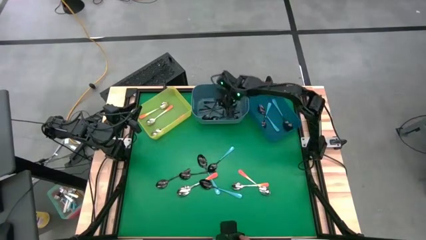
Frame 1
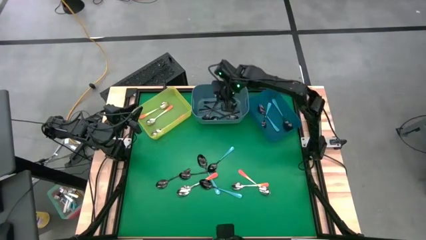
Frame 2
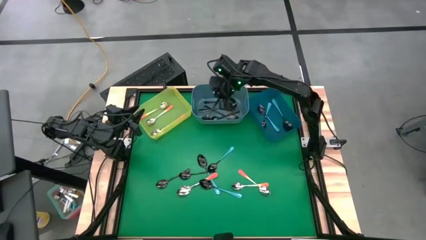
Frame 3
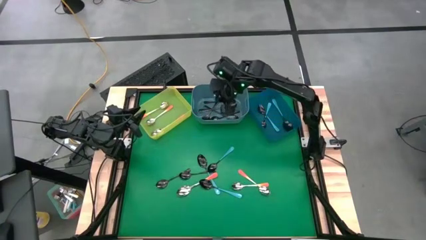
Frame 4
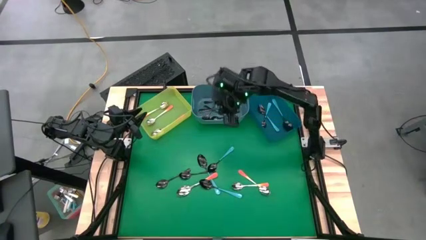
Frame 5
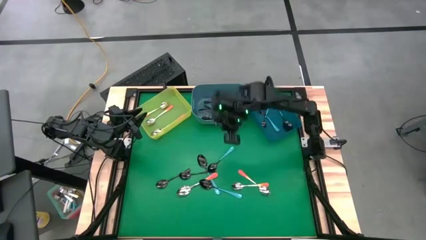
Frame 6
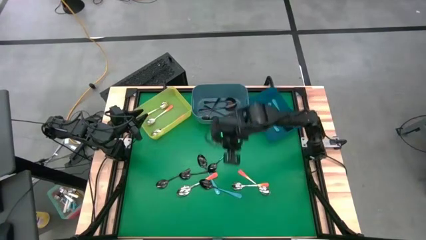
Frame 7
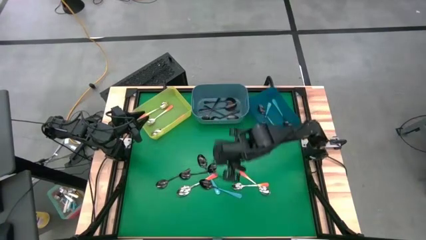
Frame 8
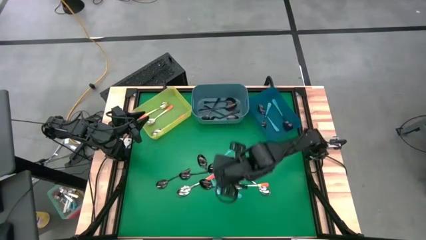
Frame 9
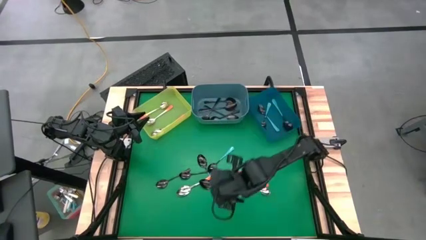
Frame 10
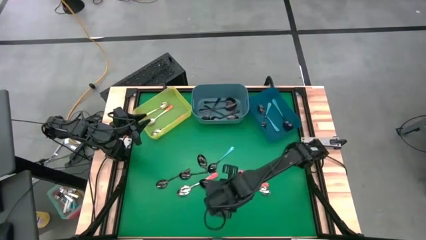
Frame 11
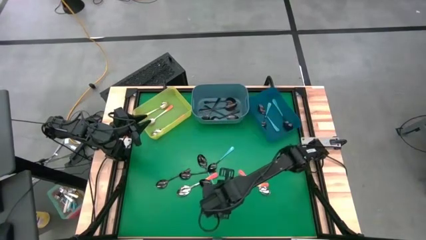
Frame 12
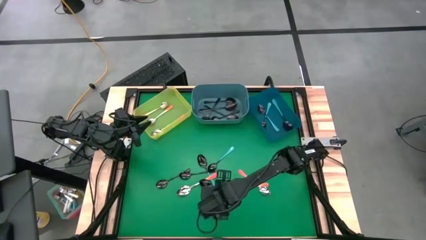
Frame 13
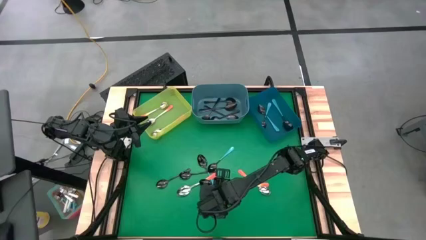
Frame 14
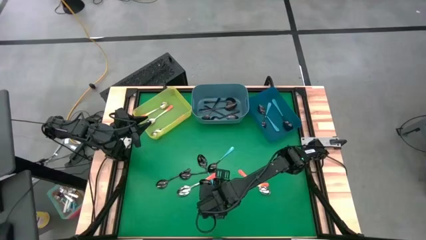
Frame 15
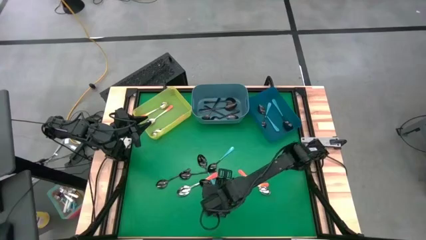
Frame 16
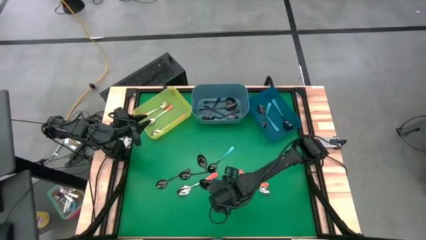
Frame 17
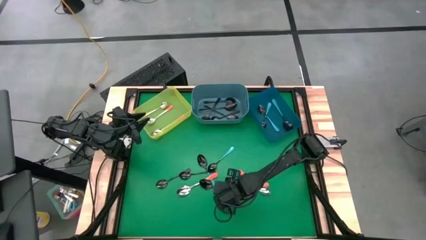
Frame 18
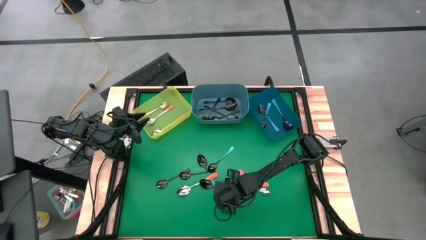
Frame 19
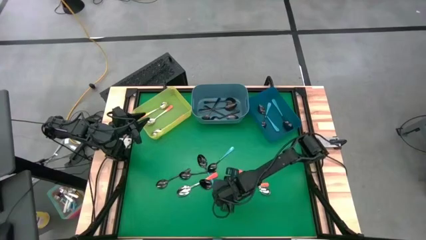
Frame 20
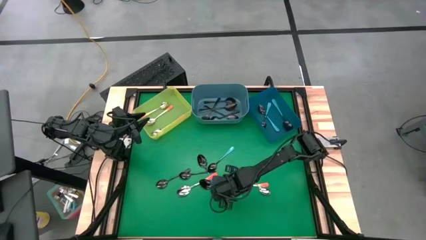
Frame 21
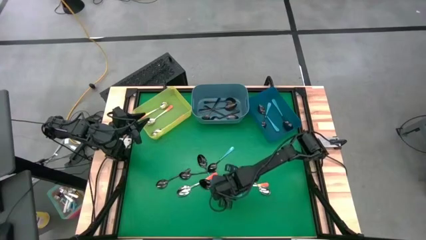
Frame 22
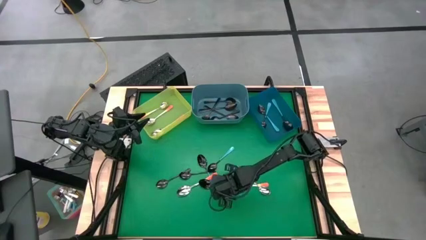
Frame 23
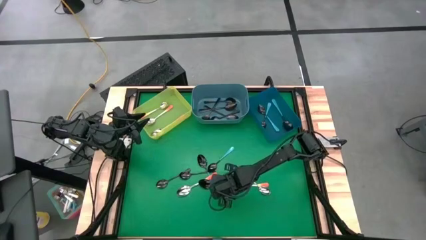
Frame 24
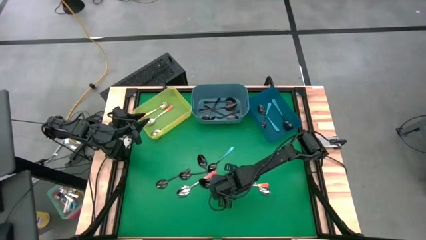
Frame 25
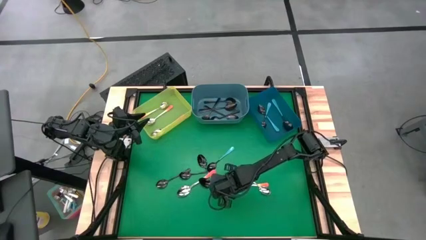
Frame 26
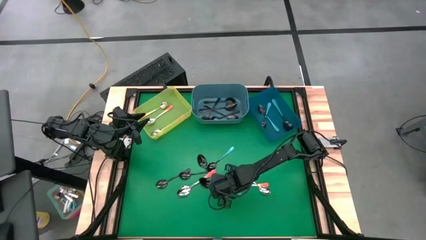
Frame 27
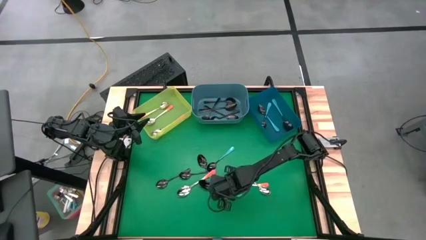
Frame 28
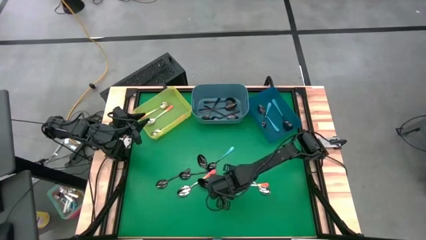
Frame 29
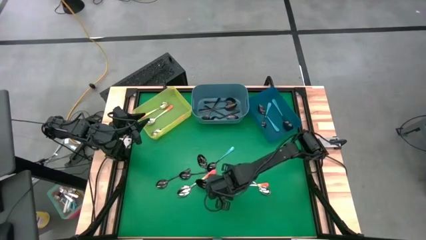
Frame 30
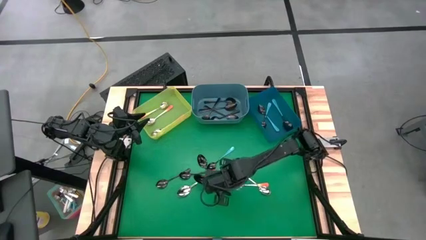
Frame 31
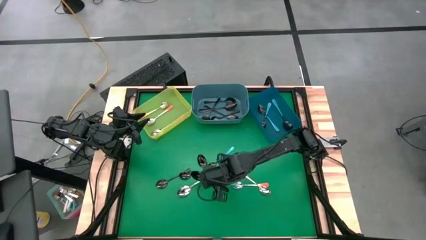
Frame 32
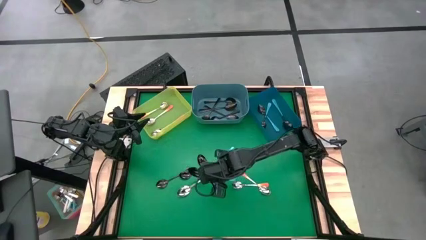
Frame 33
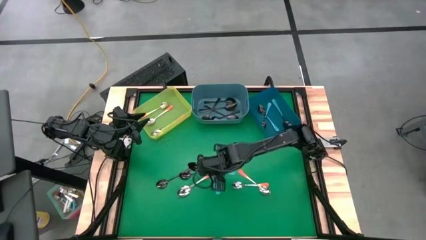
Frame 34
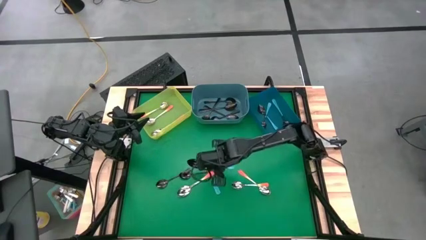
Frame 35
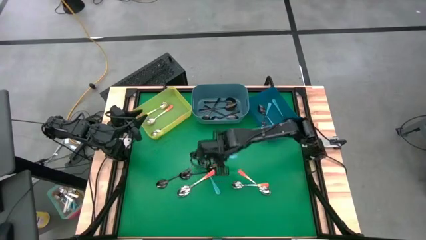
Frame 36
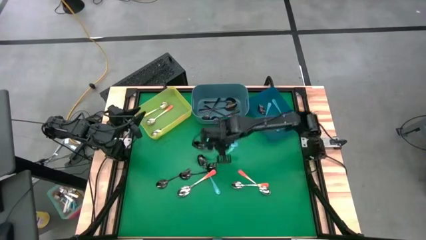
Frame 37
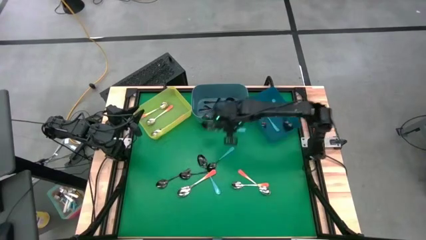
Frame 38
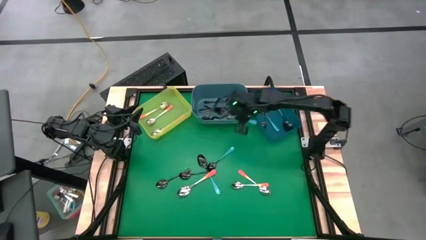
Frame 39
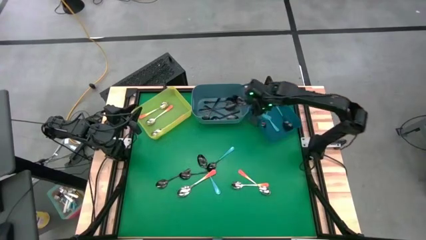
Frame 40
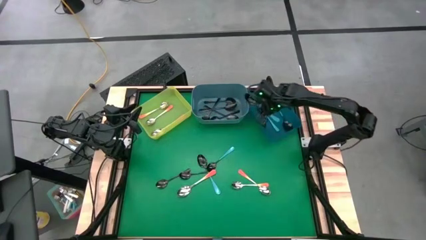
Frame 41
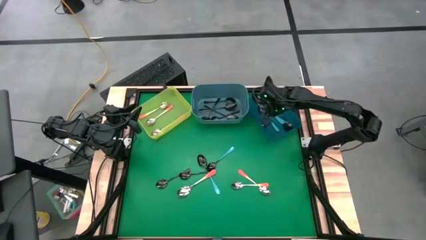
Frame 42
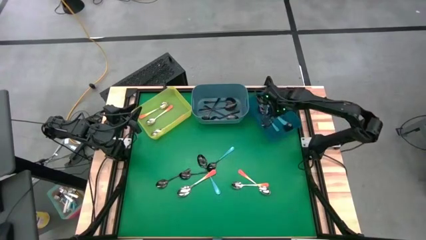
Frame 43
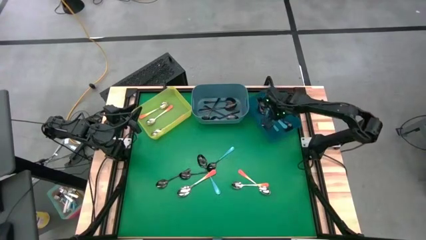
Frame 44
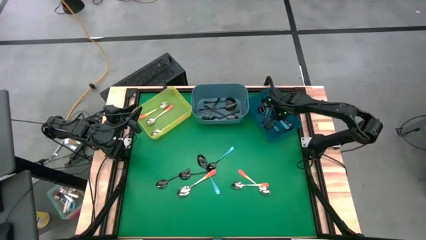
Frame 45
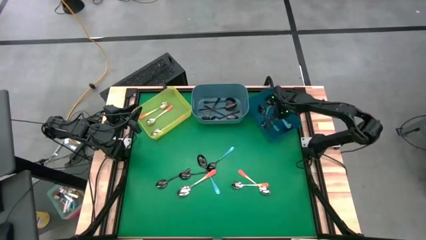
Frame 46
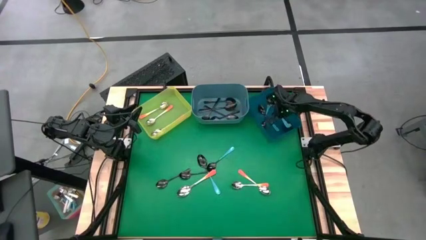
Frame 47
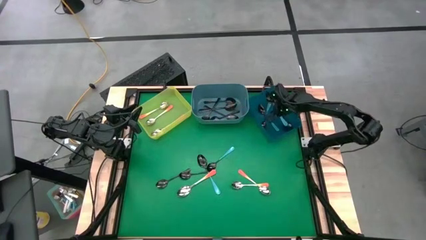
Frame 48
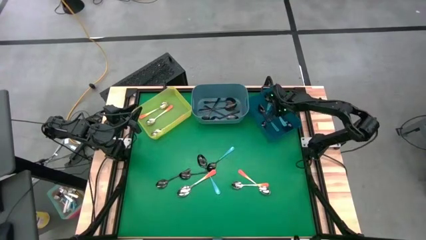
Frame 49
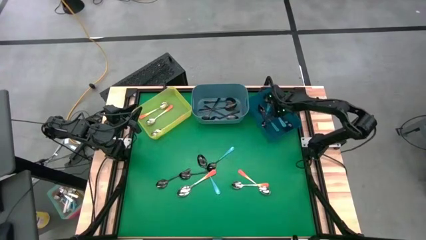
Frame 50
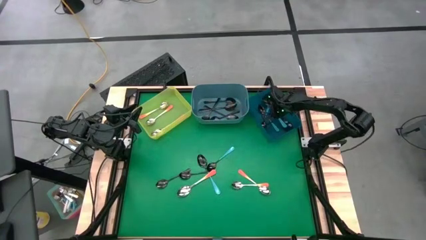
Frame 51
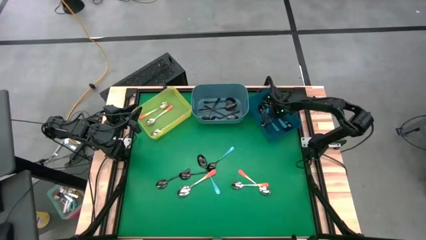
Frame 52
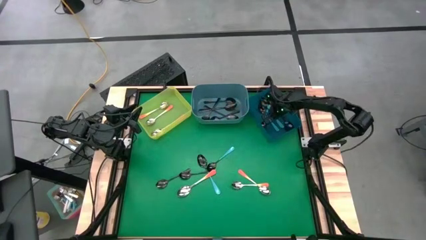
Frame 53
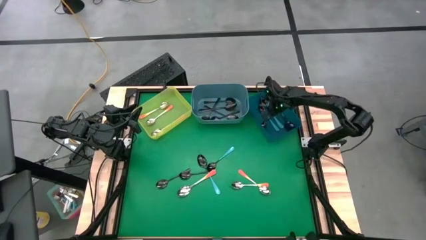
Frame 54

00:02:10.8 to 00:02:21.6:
Task: Sort silverware by color (type)
Put the blue spoon into the blue bin

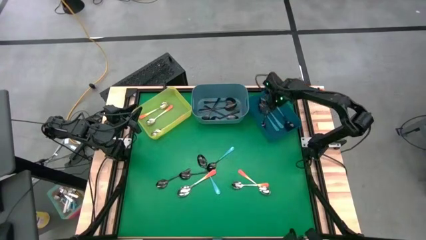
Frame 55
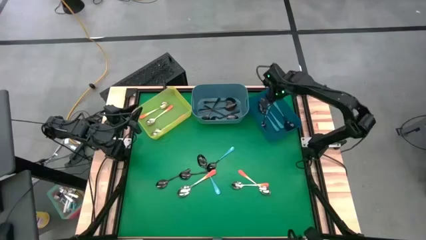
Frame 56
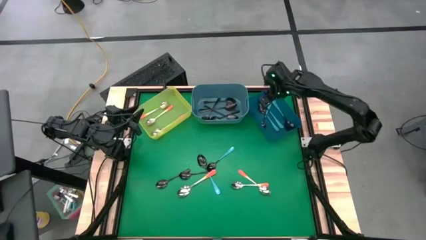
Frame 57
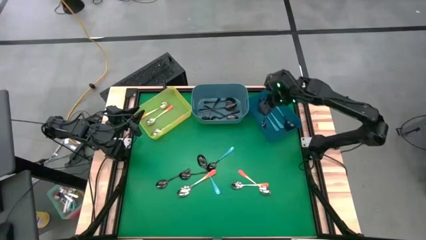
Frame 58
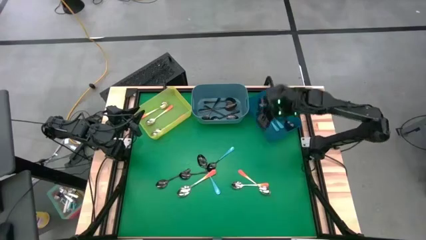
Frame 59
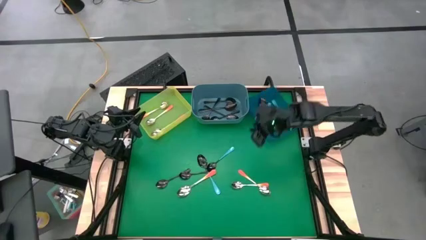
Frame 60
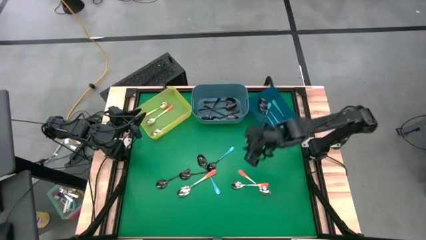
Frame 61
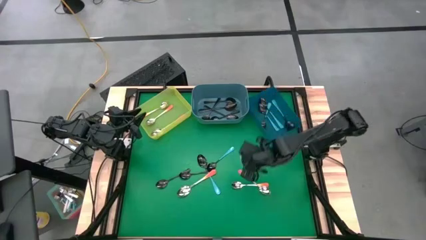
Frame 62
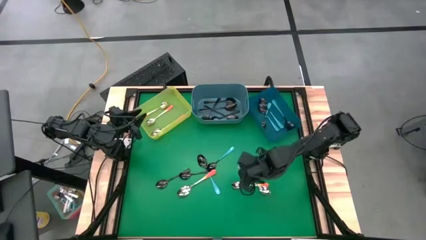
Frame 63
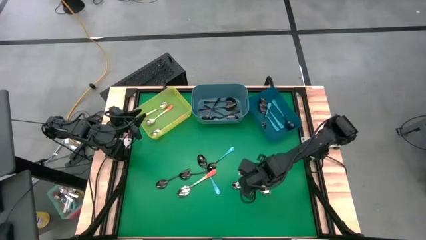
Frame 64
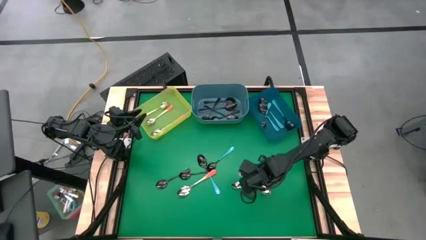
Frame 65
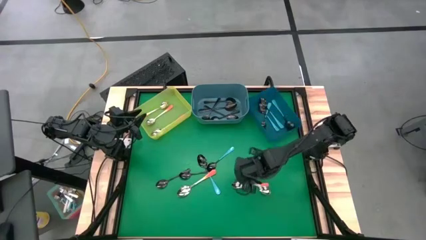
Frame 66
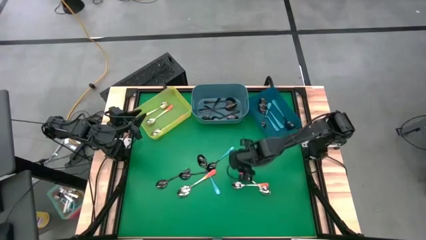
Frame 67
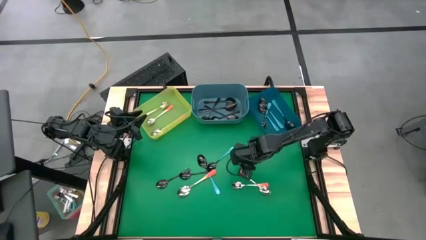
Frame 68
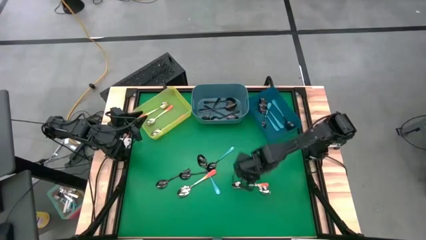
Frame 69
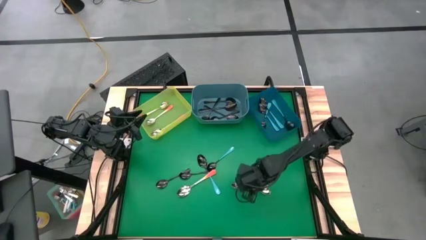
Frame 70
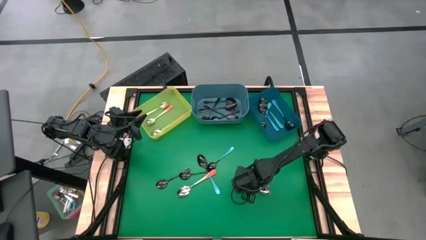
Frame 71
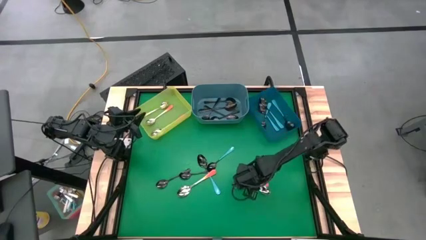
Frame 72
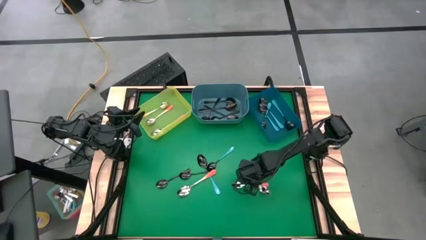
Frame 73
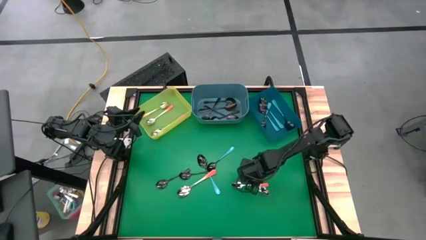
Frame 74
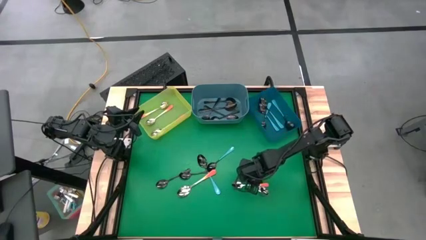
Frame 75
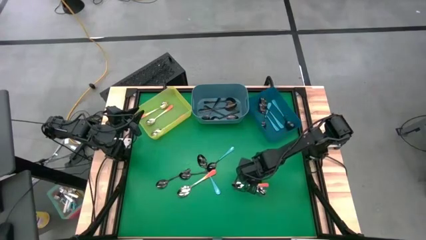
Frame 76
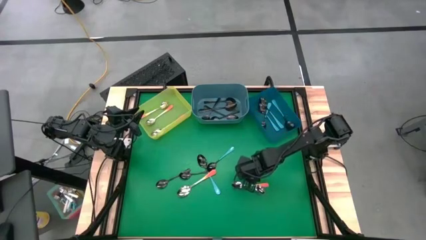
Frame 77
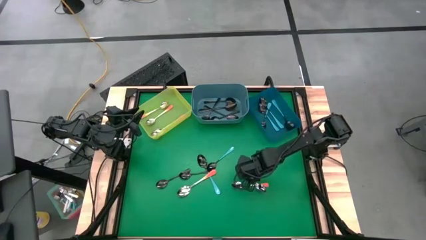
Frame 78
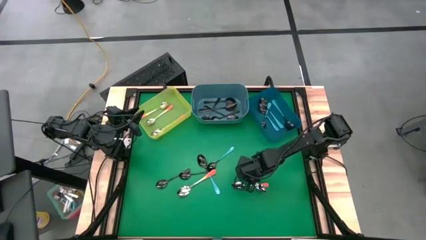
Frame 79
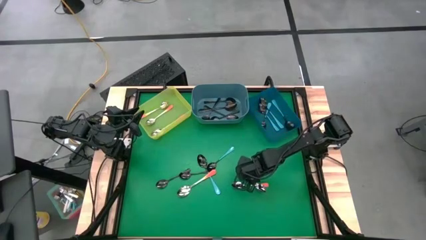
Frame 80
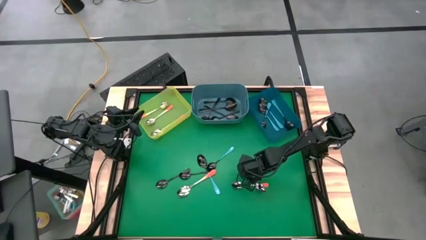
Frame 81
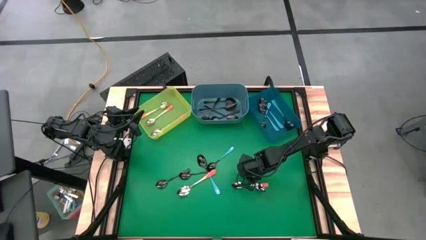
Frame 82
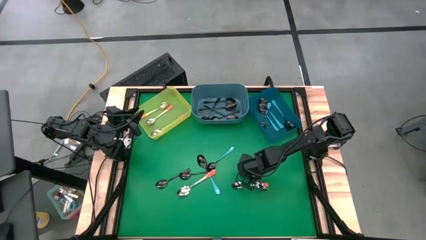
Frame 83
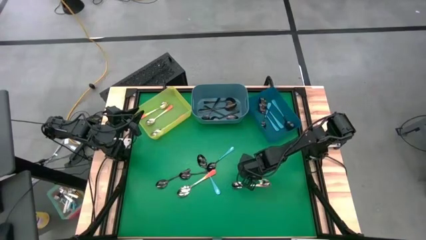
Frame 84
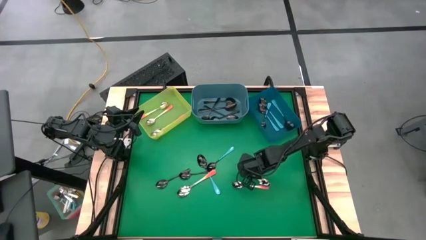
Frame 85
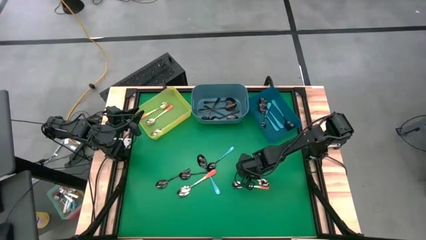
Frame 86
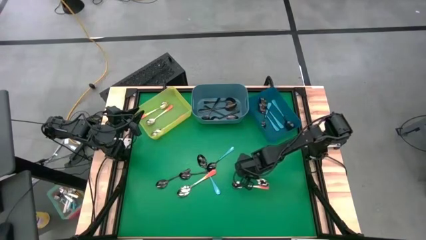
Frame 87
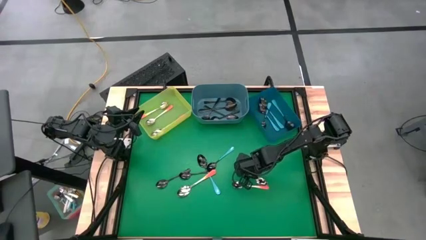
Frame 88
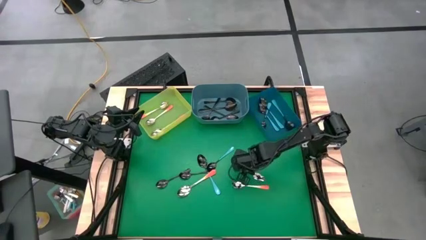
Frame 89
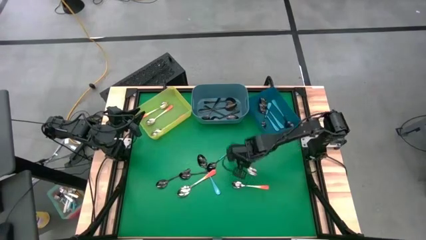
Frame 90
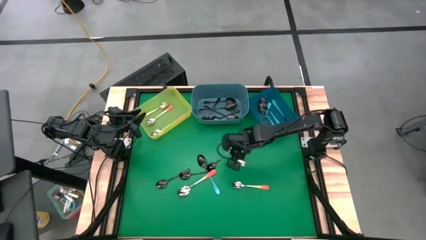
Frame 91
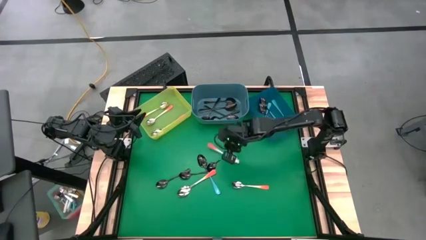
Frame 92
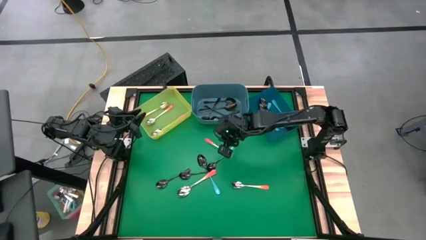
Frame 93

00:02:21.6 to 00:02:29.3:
Put the orange spoon into the yellow bin
